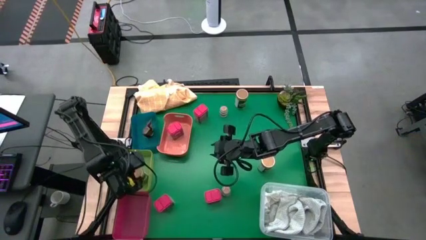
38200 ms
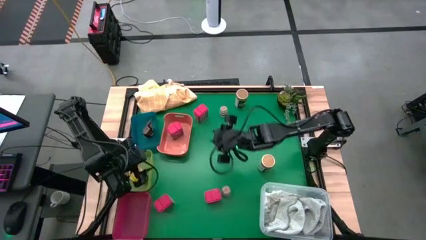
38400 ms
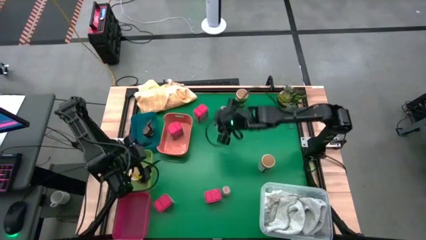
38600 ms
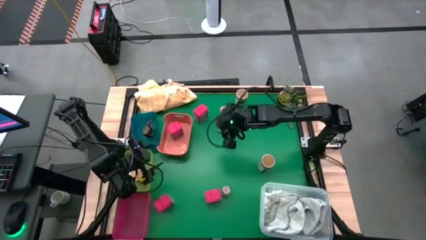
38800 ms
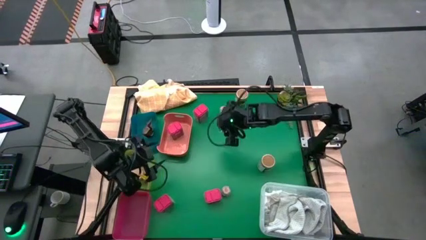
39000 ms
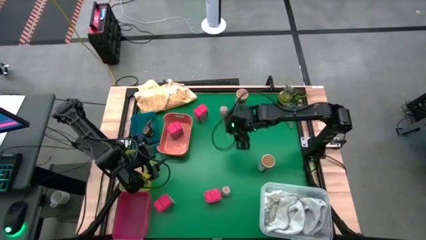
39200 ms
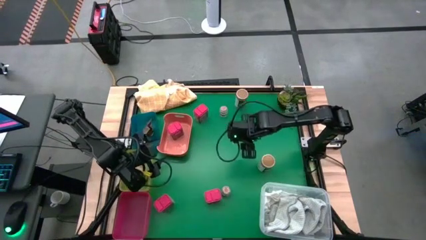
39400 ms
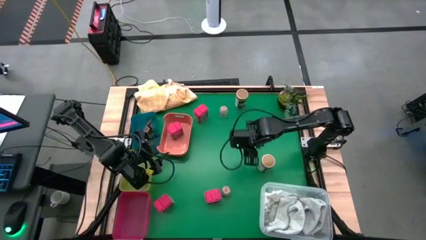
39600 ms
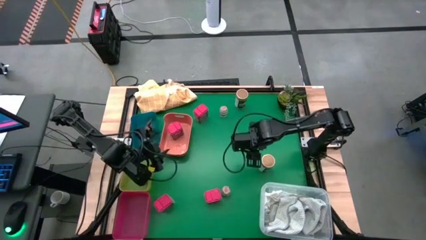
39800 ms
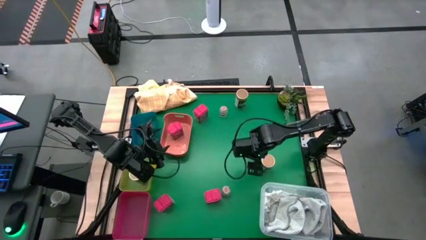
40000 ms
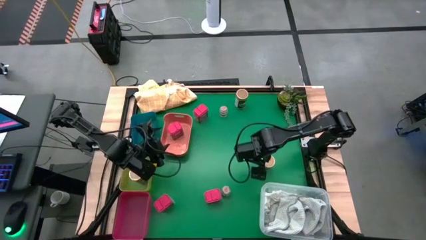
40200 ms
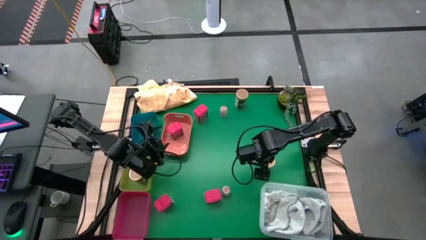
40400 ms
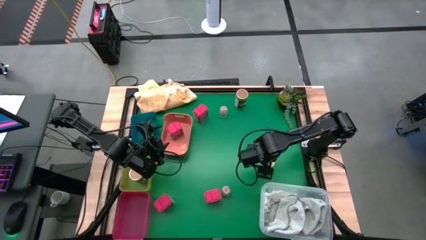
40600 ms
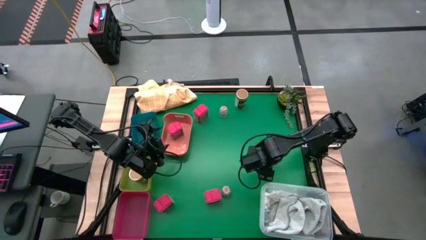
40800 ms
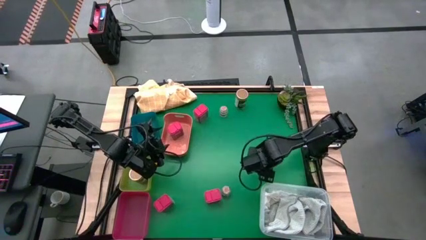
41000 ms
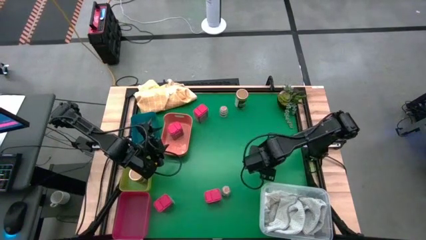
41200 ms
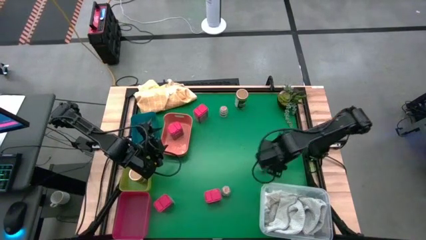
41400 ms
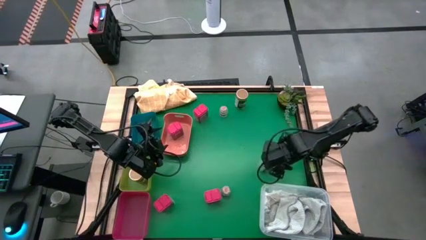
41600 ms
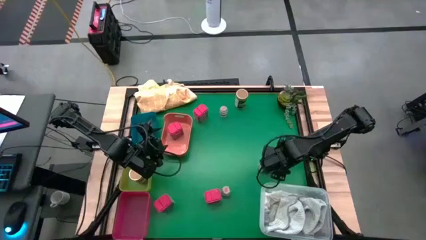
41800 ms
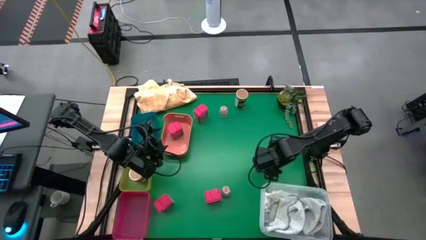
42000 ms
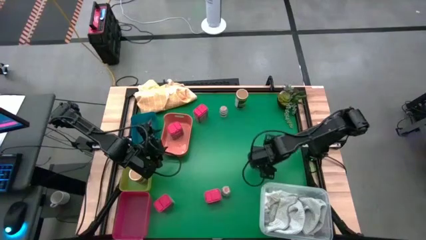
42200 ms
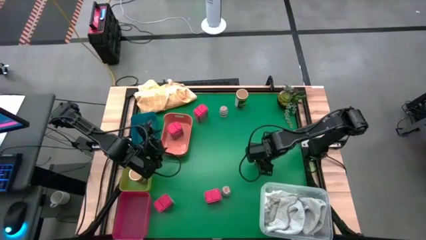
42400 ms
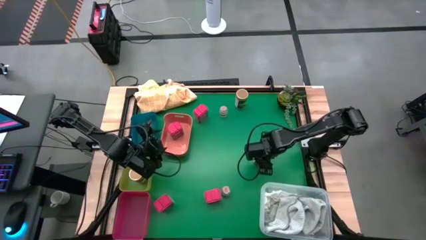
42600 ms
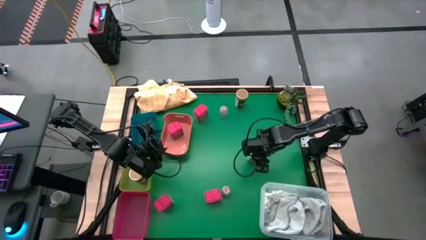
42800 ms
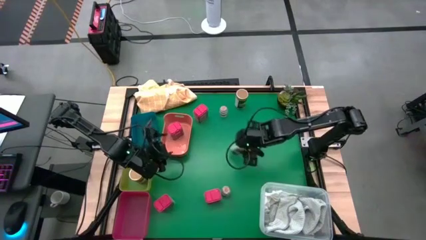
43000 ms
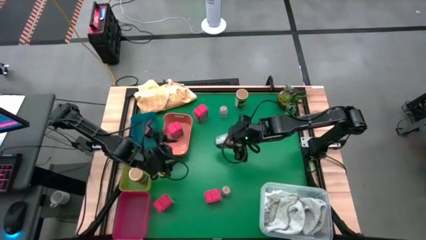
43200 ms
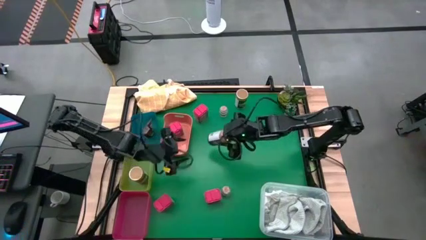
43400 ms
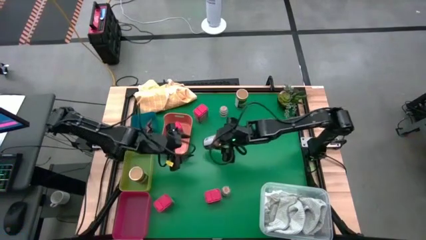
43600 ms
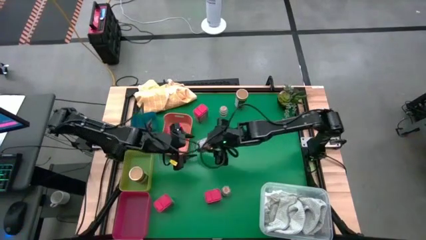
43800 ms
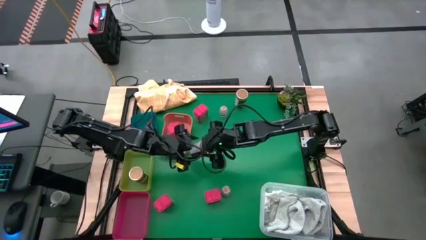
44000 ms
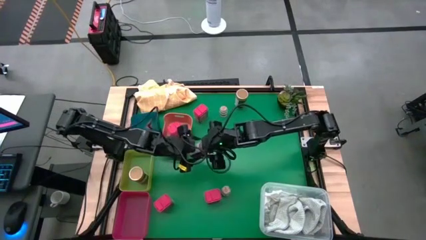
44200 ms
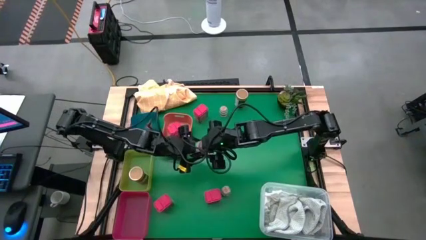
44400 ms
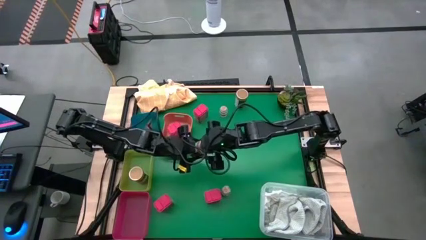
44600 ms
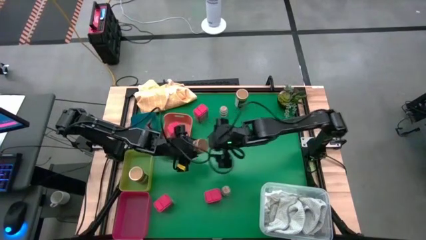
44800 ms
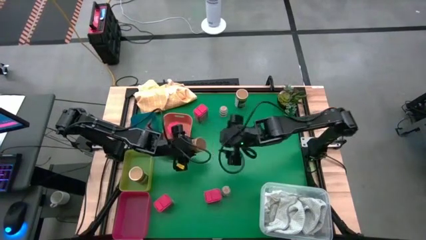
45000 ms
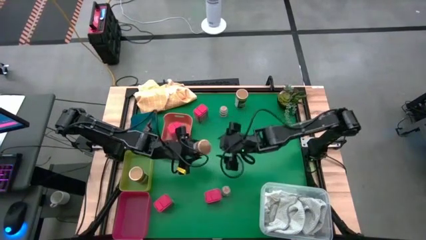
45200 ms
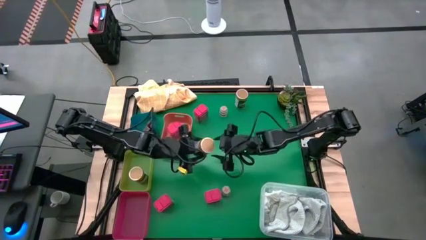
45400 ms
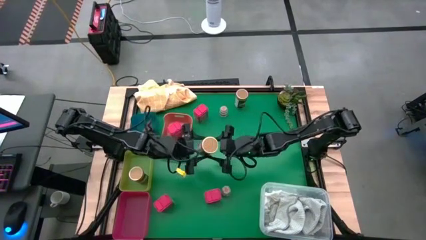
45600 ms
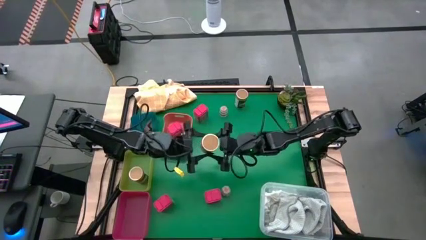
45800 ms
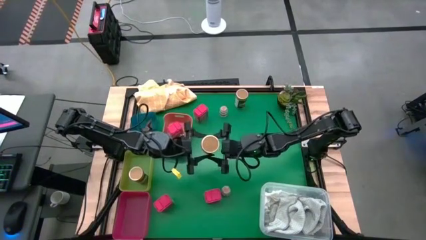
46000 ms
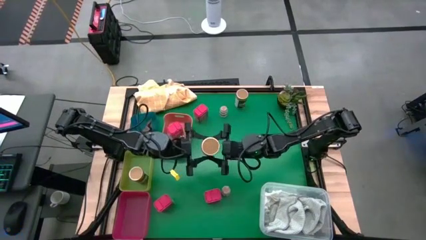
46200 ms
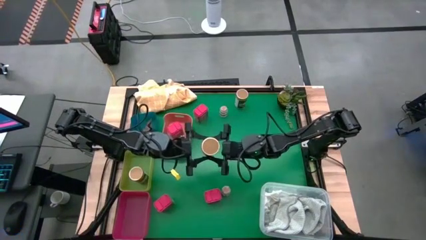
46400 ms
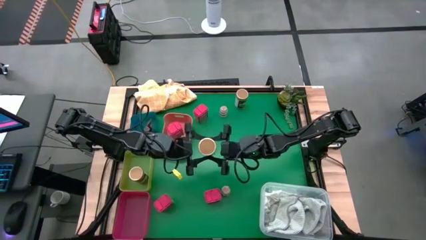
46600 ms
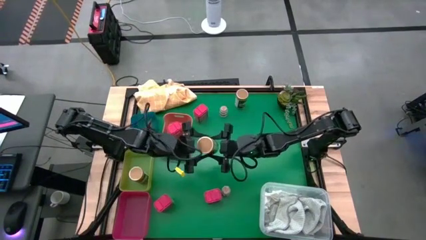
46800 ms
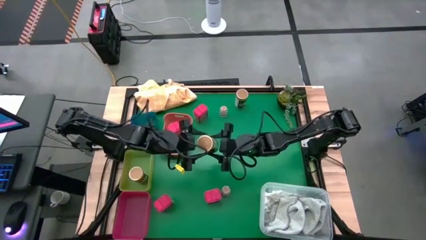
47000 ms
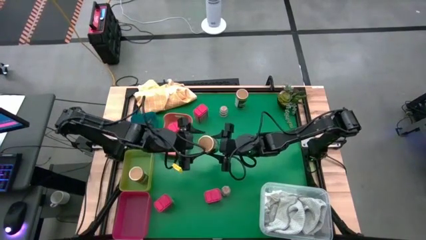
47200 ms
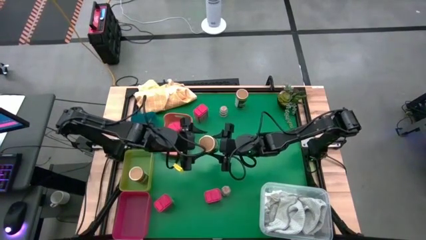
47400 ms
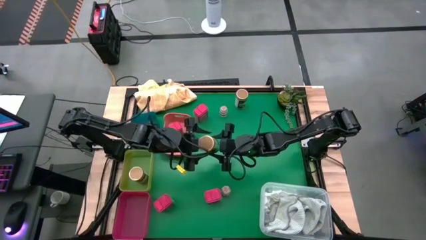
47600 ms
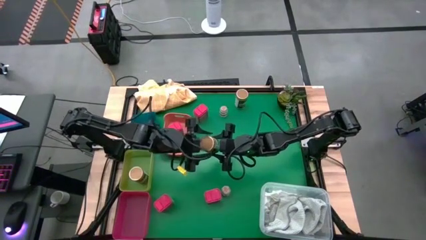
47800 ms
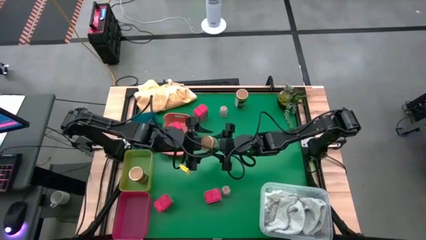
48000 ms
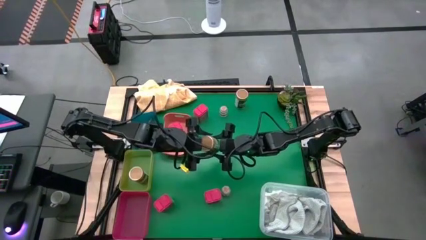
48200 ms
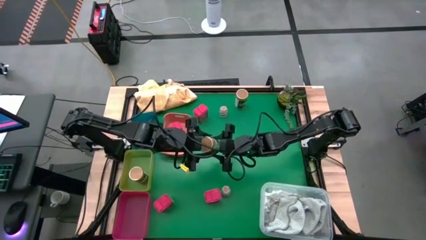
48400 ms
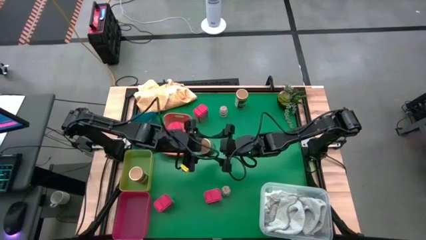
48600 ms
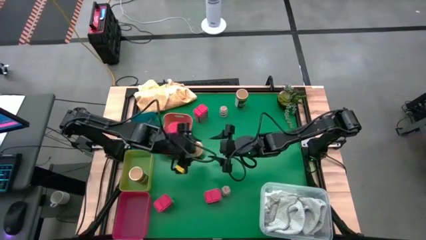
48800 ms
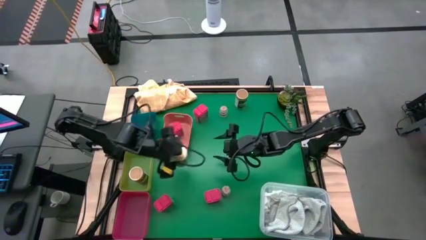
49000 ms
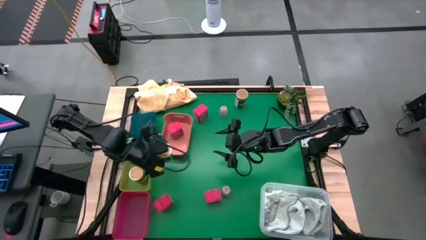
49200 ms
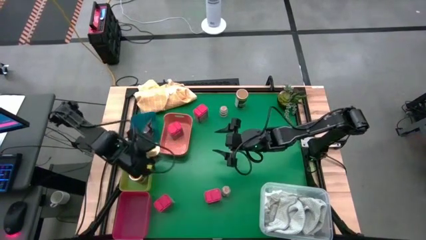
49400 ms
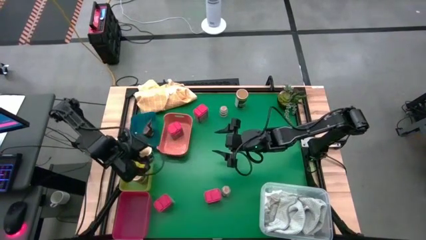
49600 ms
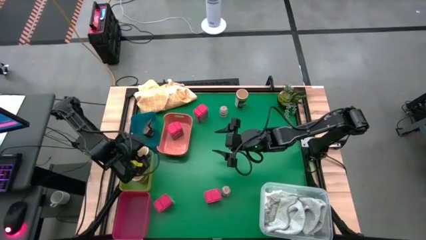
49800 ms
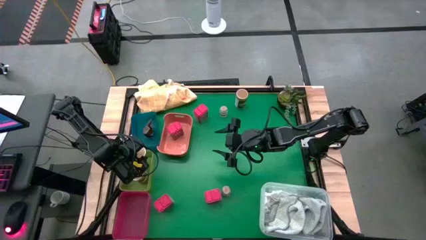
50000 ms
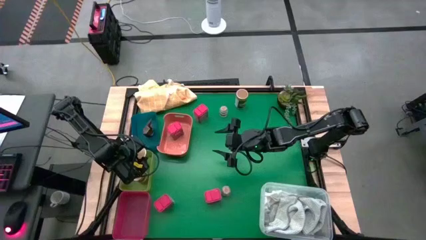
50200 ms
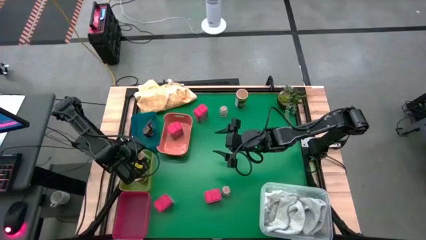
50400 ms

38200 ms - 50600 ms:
Task: Sort spices by type
Put the bottom gold seasoning bottle into the yellow bin

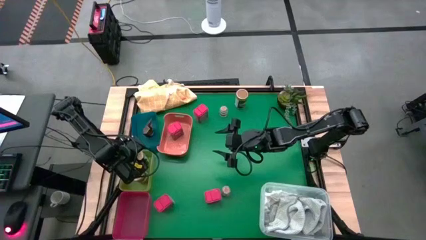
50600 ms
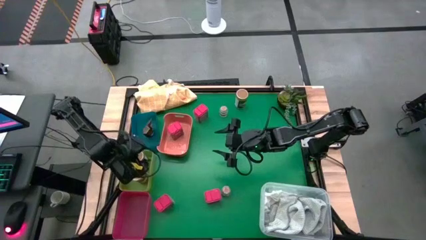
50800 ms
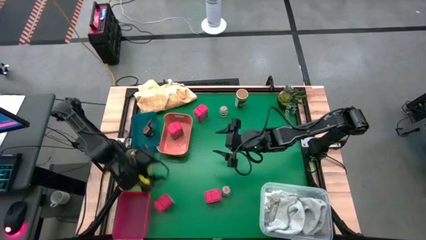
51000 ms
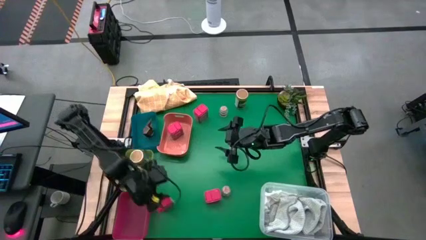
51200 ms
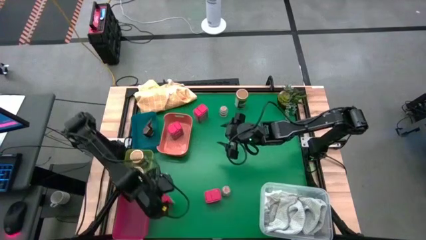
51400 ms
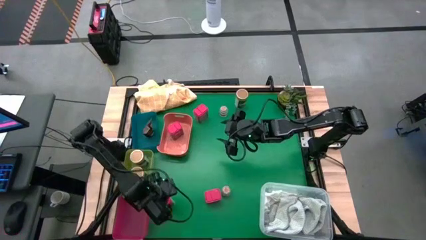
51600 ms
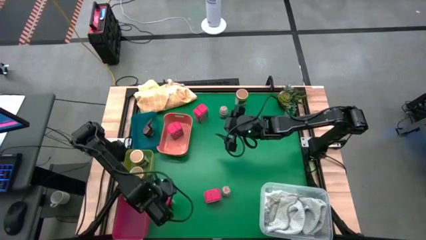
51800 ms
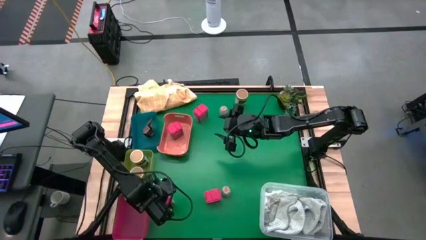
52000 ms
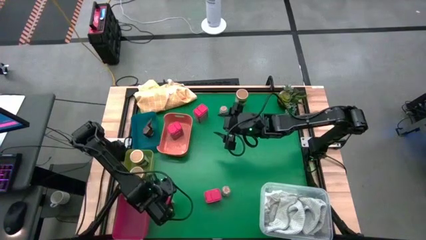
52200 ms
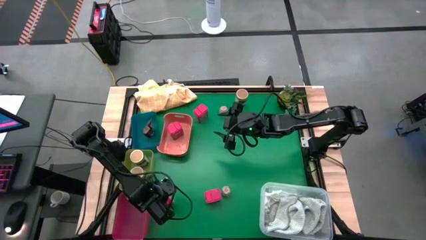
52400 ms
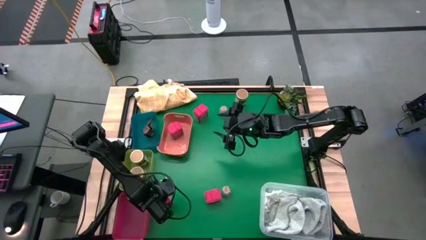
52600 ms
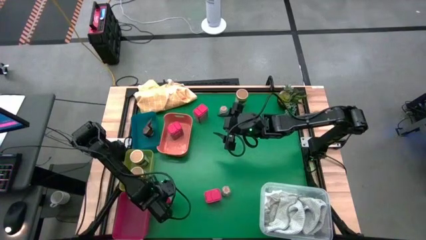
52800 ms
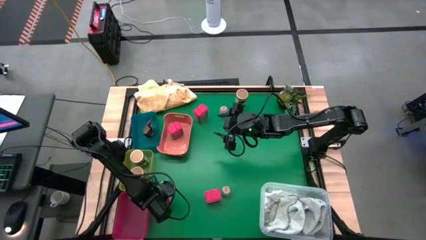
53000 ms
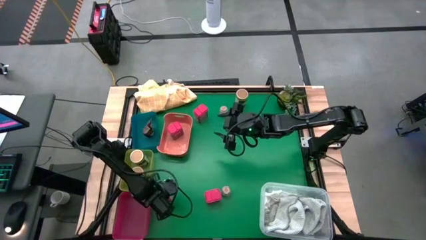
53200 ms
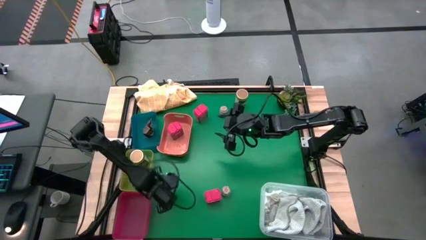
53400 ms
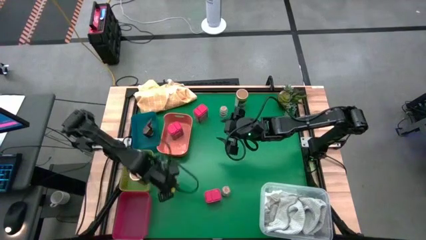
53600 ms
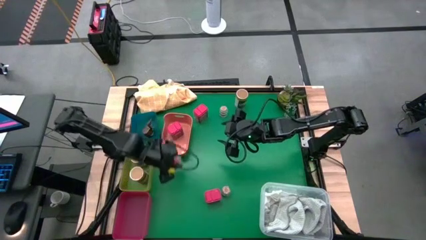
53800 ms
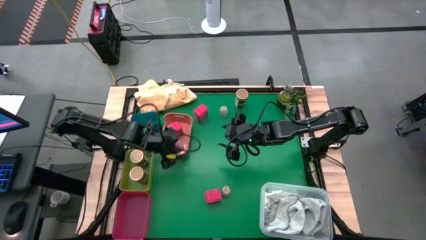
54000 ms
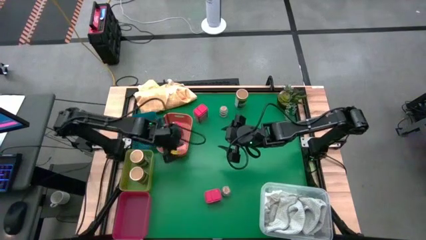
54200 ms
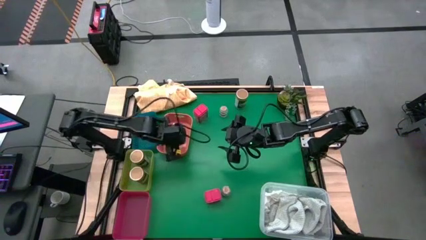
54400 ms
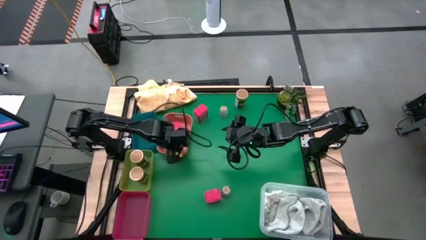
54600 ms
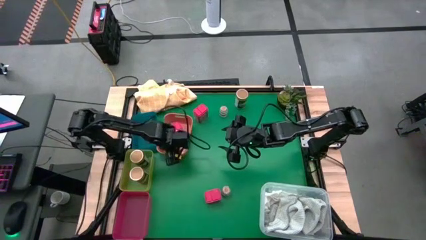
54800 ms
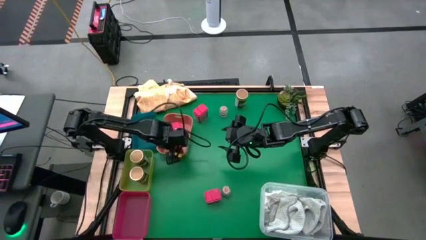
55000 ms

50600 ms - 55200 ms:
Put the bottom left red seasoning can into the orange bin

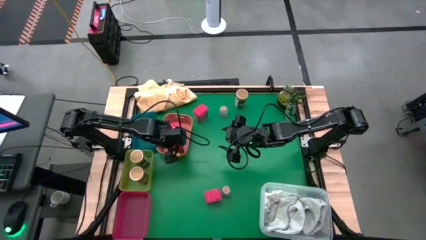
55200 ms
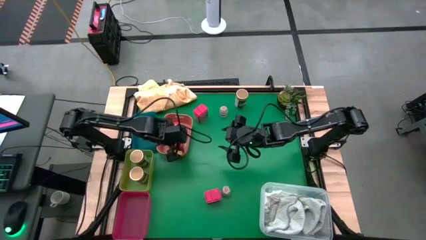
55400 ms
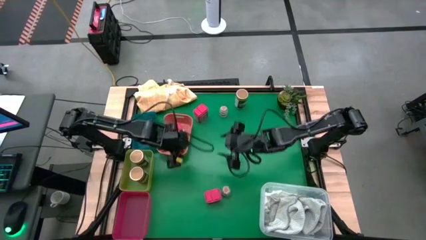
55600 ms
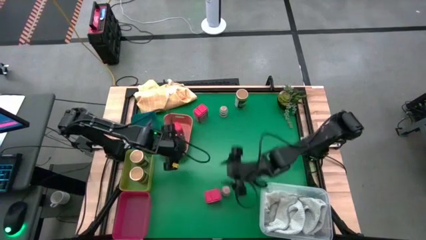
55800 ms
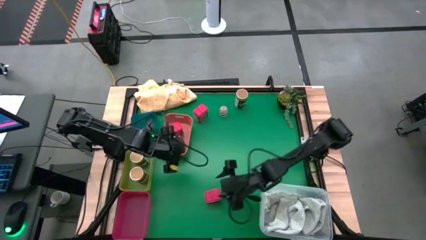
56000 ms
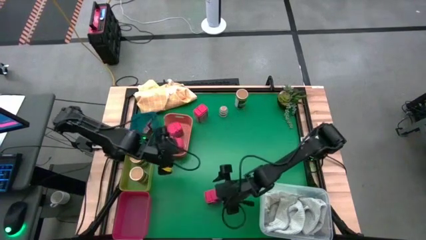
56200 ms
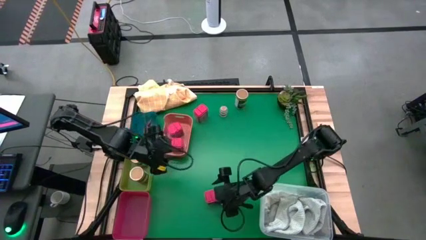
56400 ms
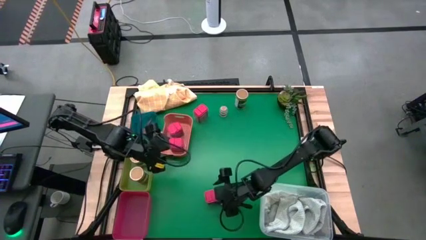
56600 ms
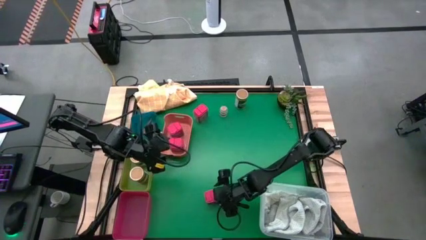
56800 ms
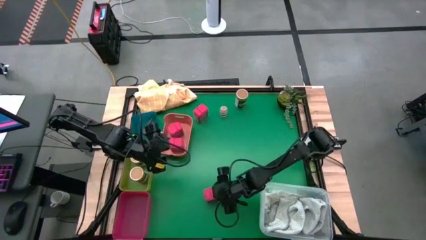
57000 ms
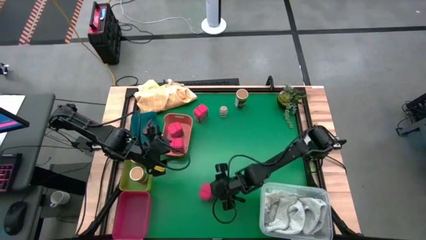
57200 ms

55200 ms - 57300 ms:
Put the bottom red seasoning can into the orange bin
